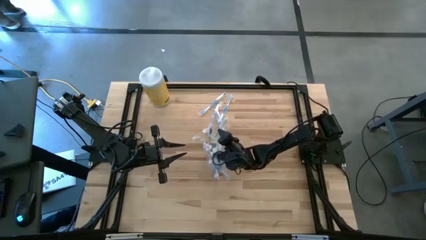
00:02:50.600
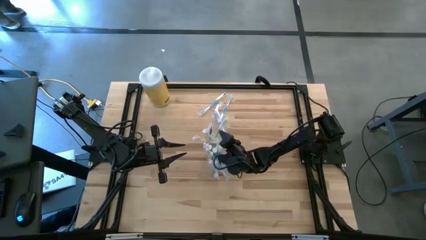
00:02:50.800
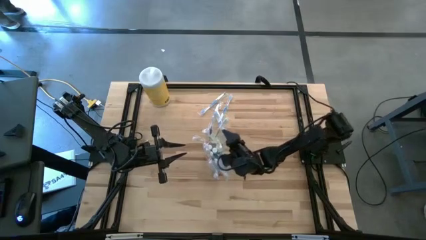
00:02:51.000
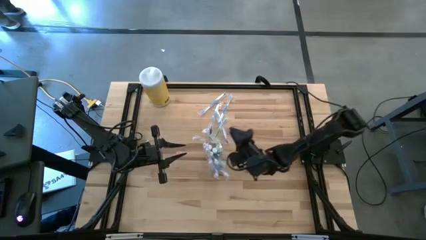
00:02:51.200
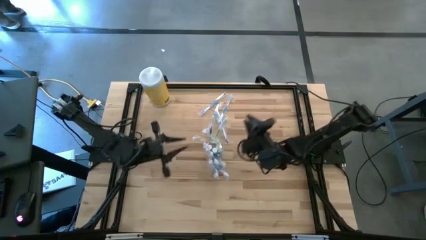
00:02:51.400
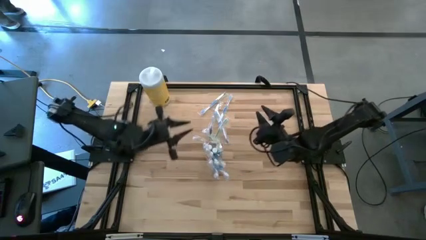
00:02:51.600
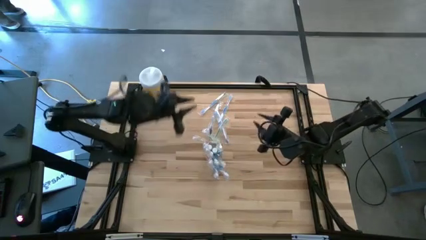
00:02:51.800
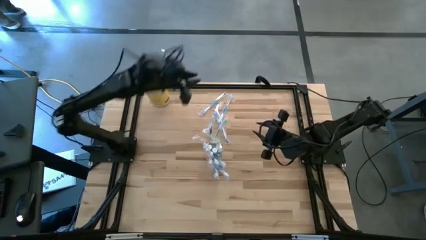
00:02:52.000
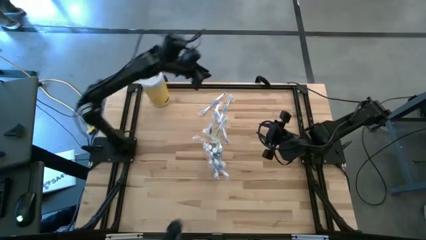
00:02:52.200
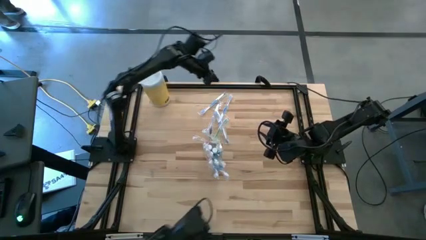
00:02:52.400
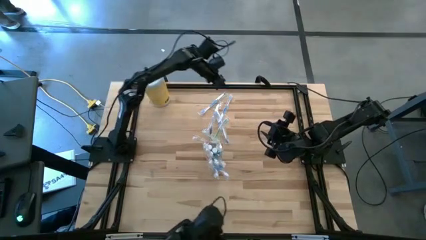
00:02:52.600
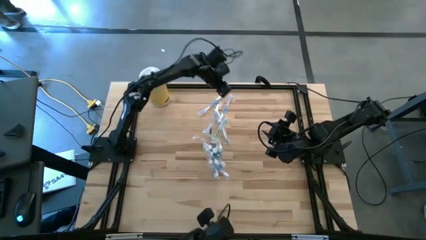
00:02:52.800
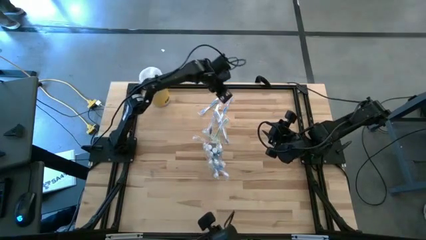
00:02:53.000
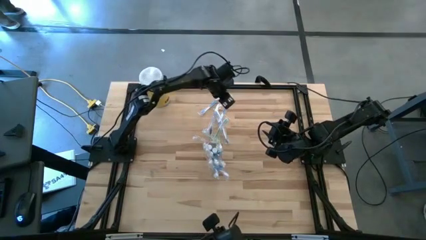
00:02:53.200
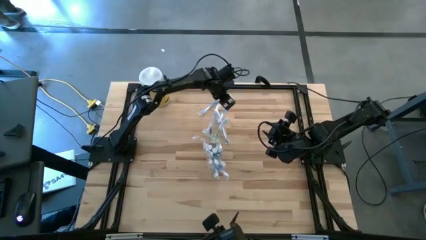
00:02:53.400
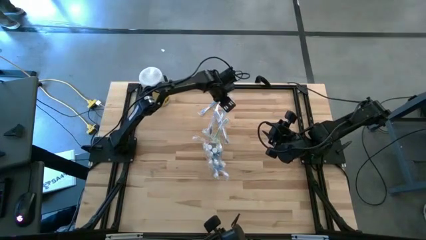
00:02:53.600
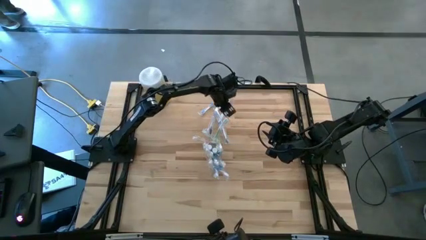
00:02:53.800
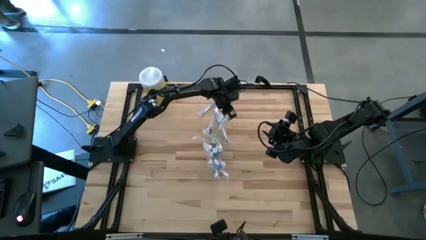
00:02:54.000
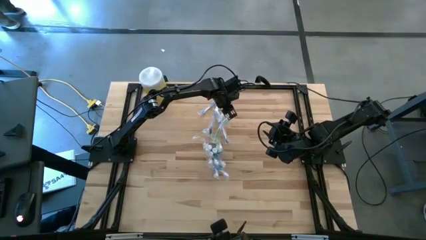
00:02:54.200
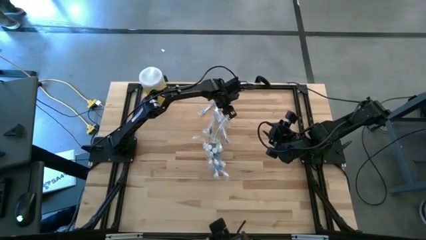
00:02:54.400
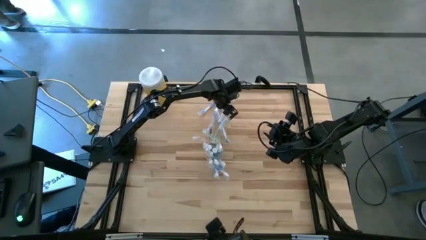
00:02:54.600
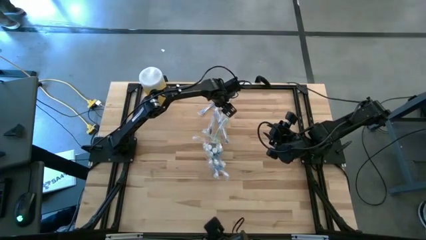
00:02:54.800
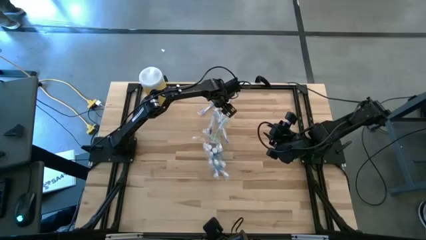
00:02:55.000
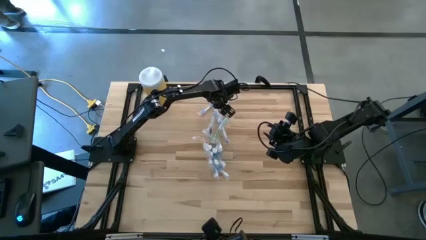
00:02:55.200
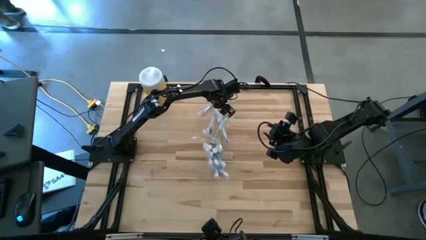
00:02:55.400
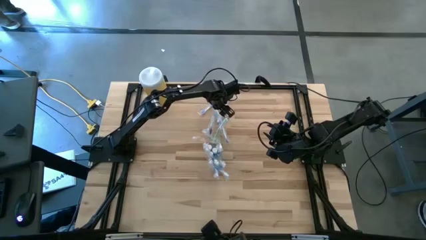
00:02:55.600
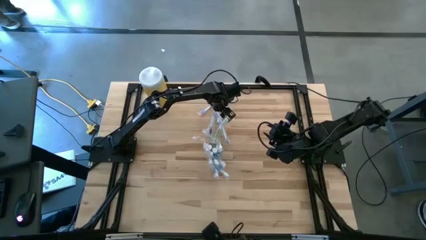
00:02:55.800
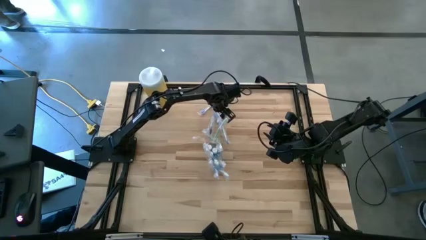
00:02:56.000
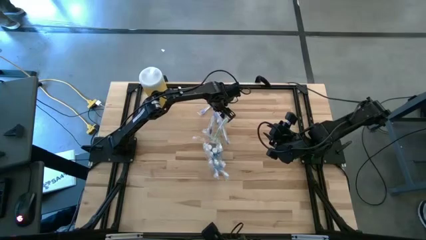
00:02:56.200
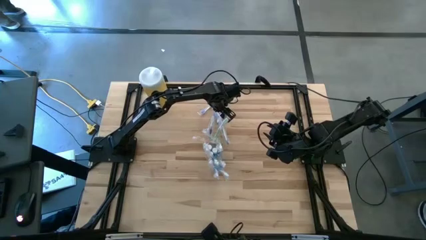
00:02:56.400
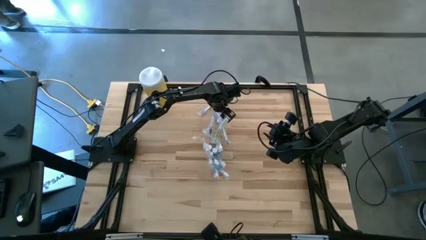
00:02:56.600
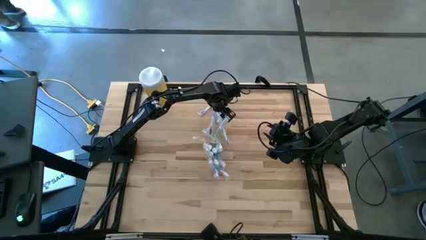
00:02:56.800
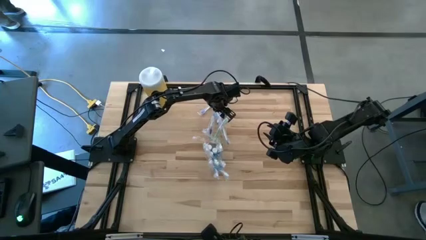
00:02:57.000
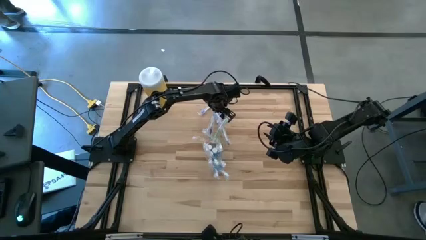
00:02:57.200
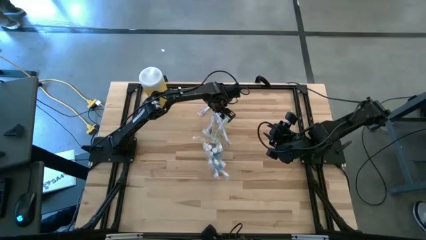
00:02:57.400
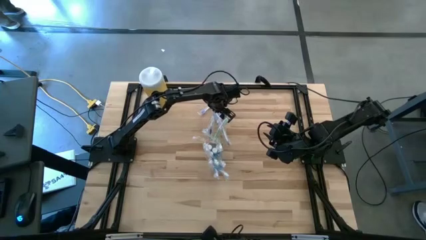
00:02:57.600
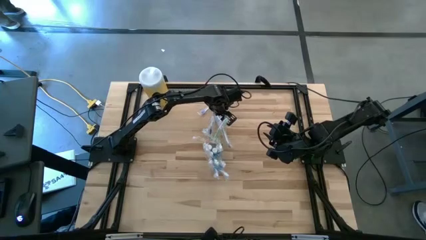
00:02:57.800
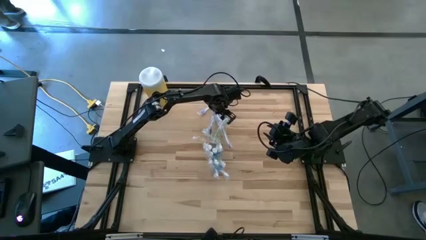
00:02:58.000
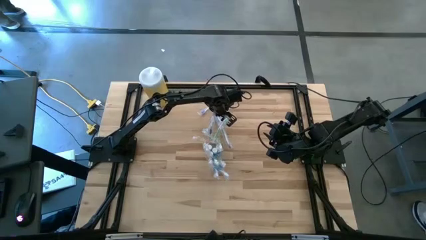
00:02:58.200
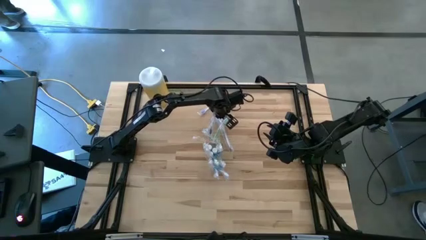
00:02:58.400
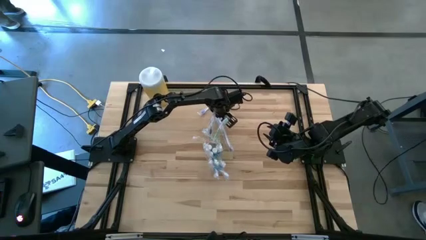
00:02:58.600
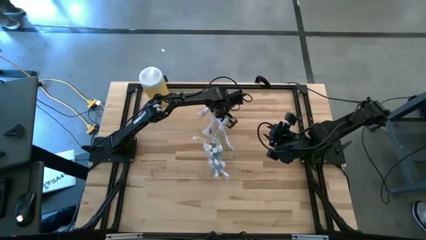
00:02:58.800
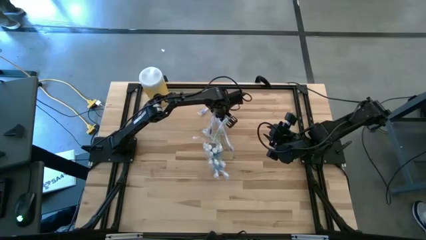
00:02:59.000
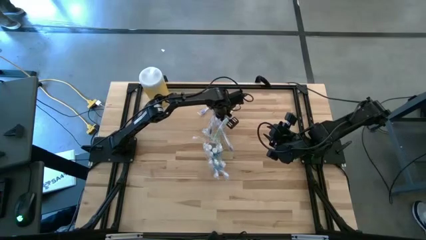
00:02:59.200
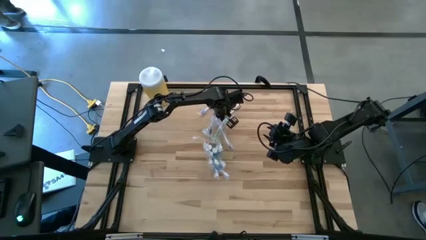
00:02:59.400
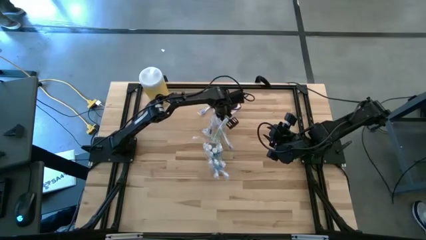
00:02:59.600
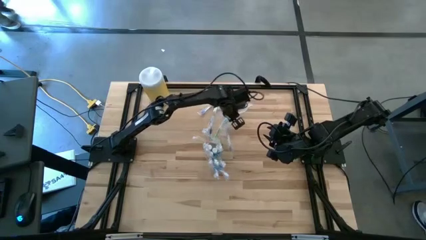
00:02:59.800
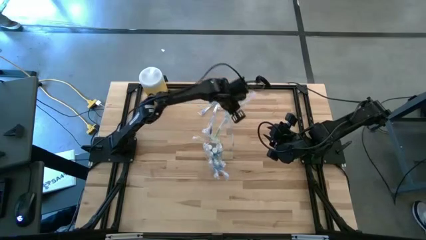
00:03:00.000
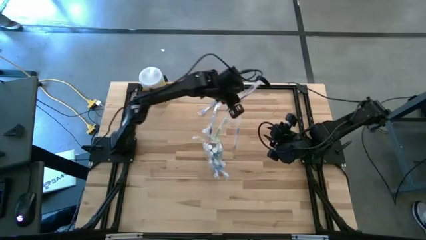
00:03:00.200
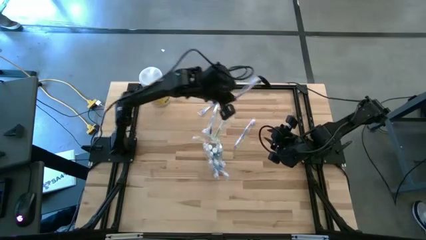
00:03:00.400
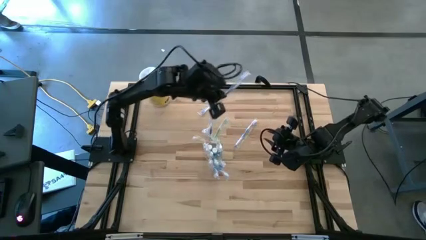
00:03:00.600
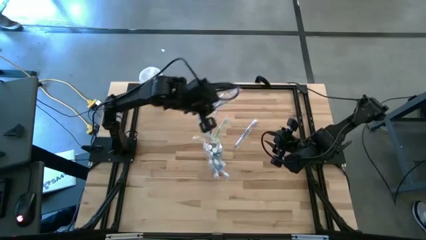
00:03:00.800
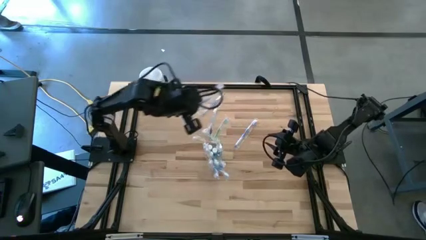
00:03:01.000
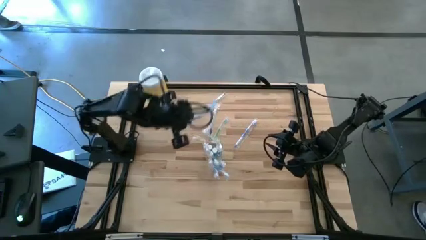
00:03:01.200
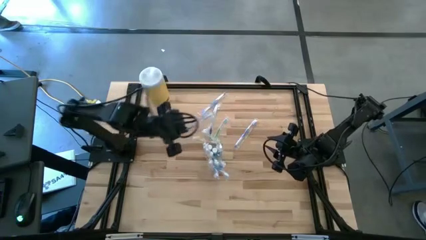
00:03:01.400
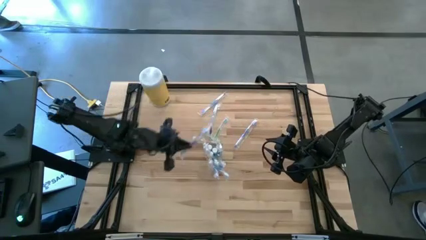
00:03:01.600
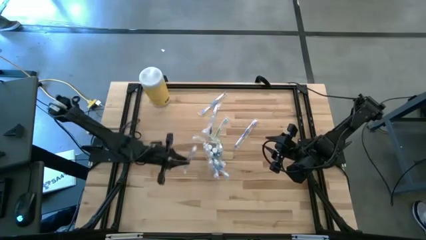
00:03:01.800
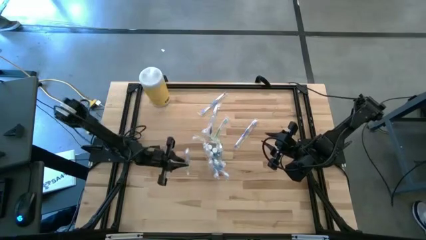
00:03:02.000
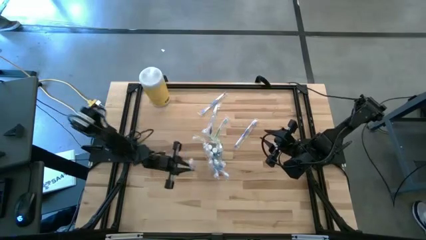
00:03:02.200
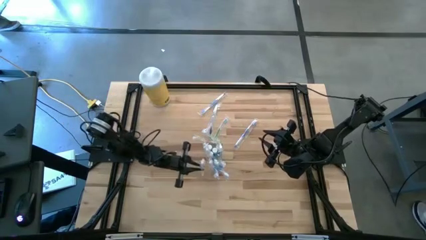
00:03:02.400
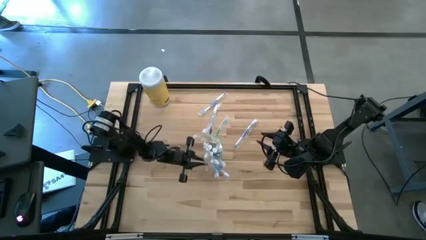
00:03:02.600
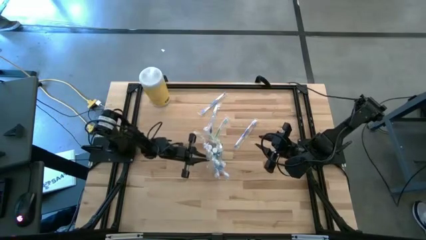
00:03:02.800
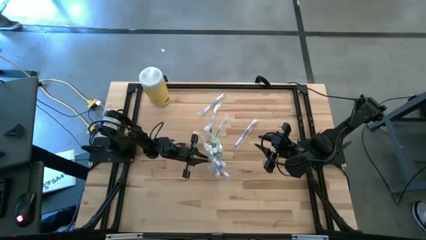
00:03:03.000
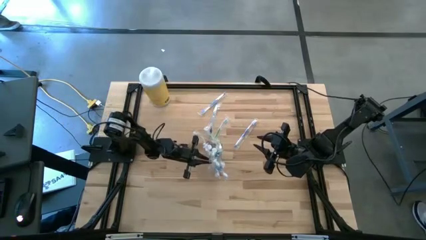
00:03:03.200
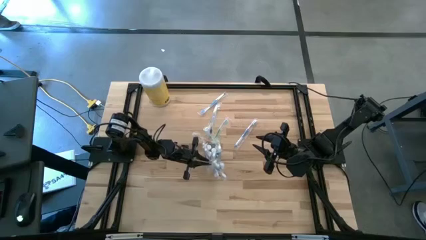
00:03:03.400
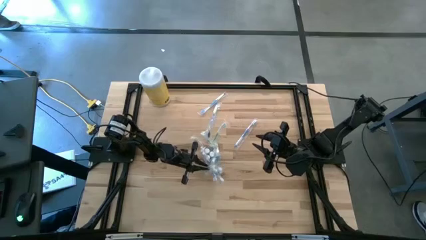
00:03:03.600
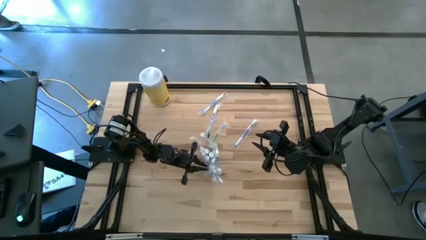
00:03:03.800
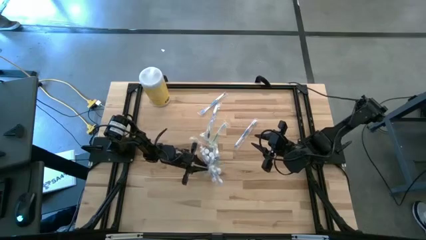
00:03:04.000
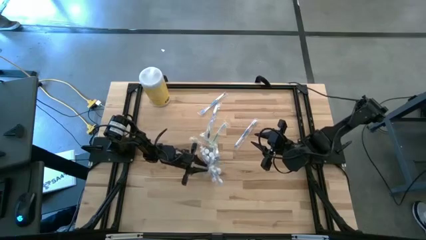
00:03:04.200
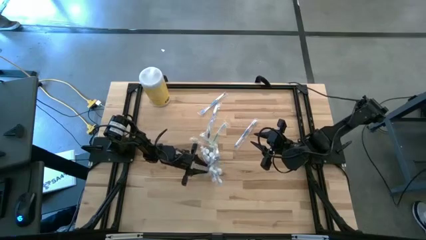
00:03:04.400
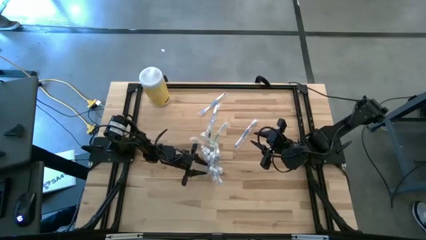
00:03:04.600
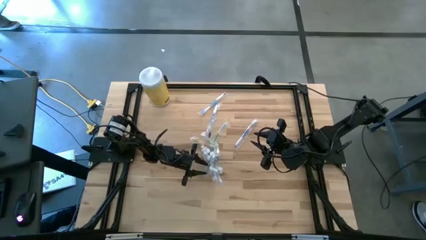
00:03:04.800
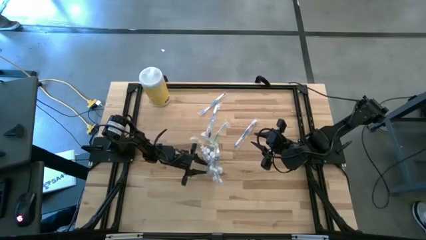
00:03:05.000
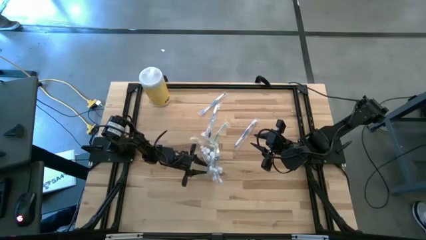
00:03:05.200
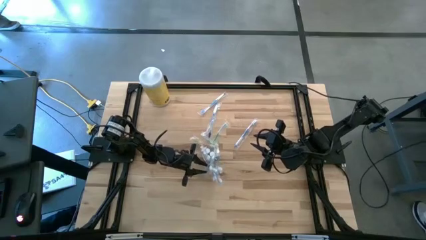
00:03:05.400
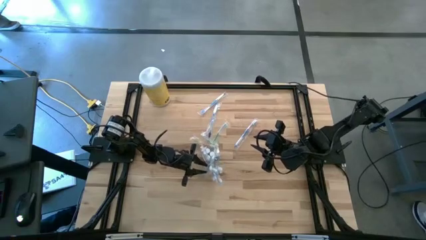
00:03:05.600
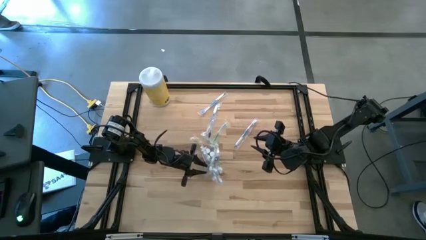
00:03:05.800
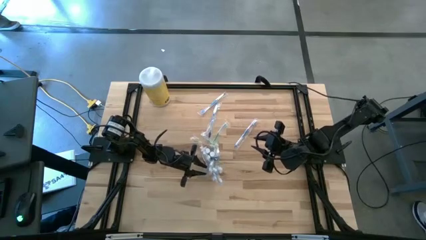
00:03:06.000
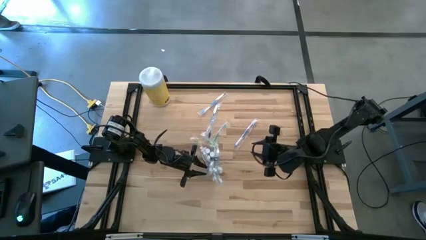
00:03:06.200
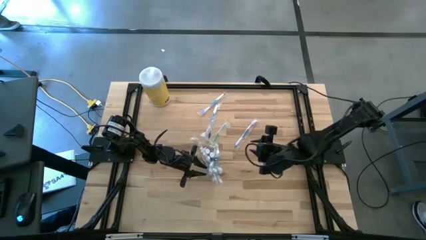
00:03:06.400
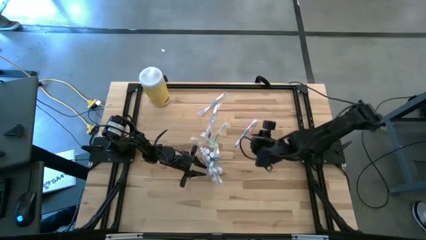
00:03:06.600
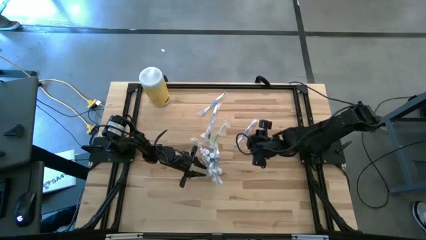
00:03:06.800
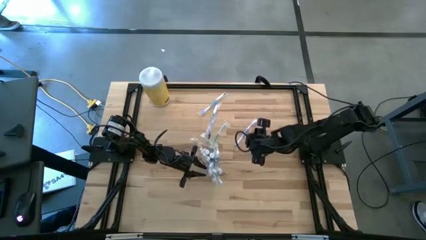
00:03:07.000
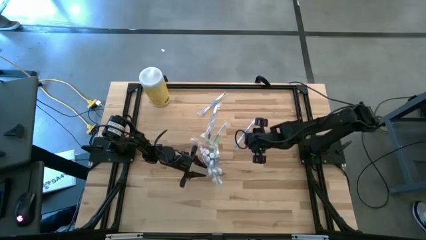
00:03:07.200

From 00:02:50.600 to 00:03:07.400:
Task: Pick & Place toothbrushing station
Put the blue toothbrush into the transparent organizer
